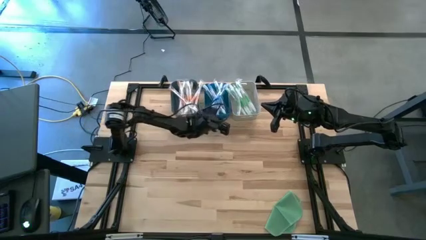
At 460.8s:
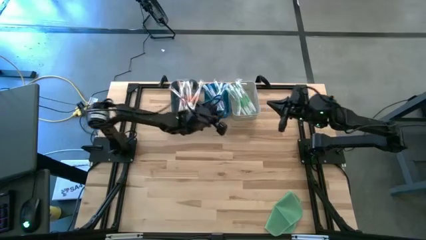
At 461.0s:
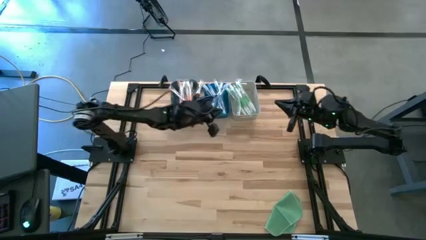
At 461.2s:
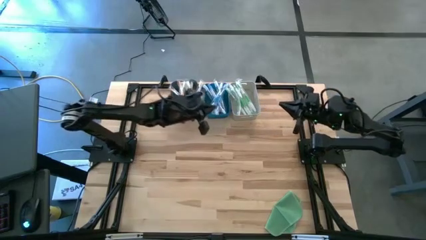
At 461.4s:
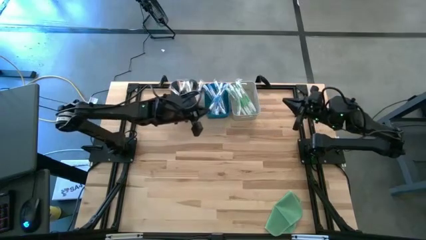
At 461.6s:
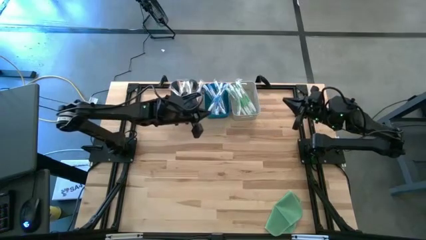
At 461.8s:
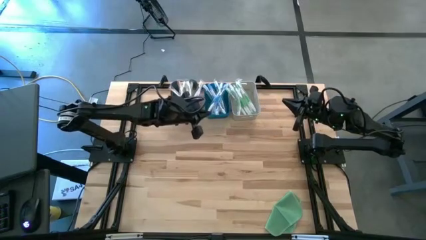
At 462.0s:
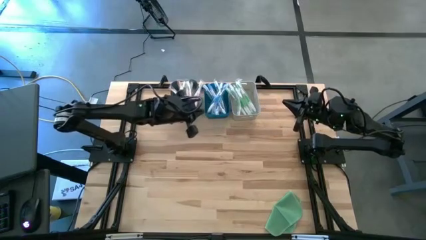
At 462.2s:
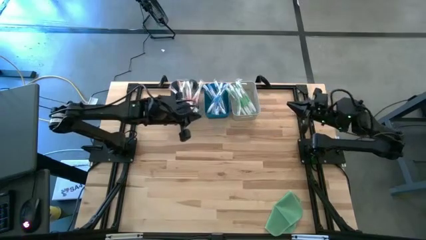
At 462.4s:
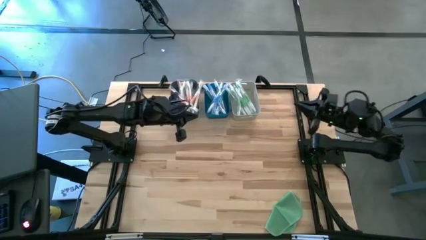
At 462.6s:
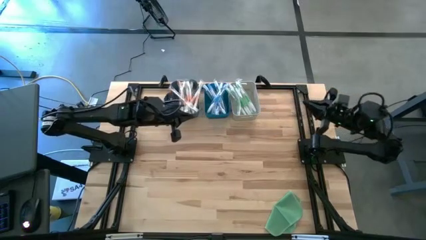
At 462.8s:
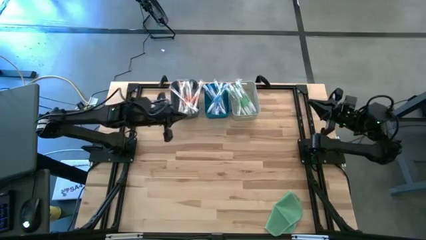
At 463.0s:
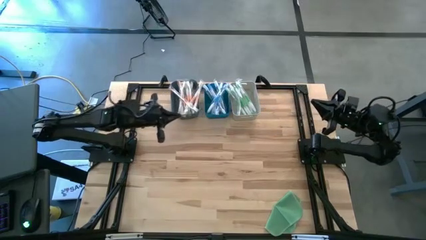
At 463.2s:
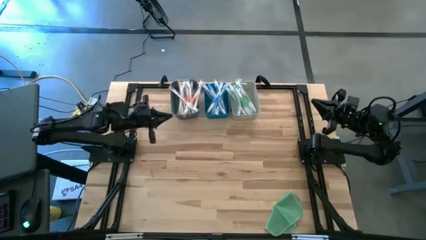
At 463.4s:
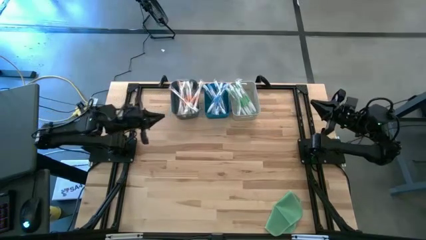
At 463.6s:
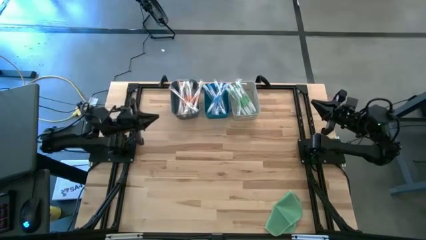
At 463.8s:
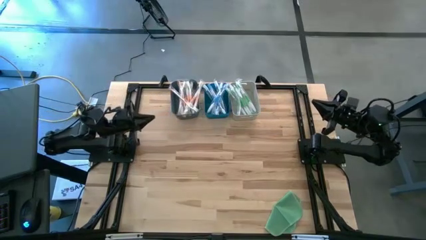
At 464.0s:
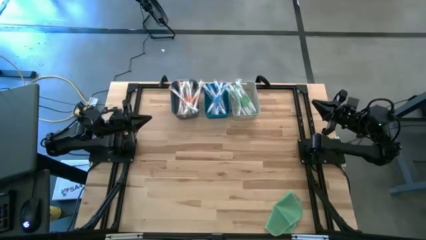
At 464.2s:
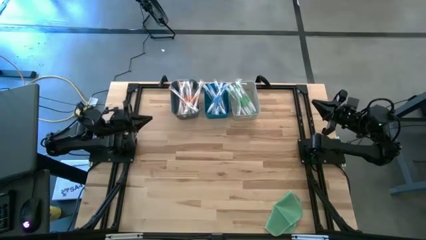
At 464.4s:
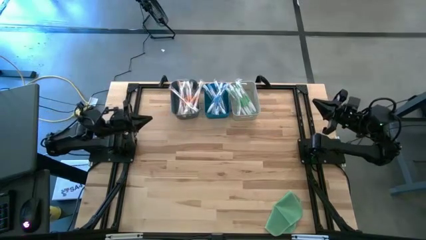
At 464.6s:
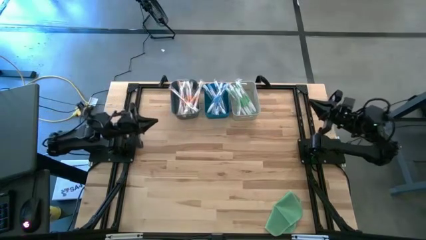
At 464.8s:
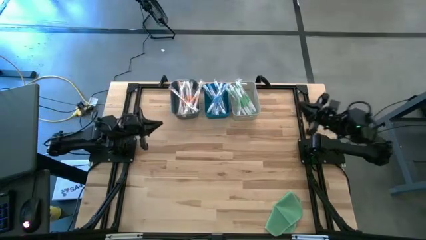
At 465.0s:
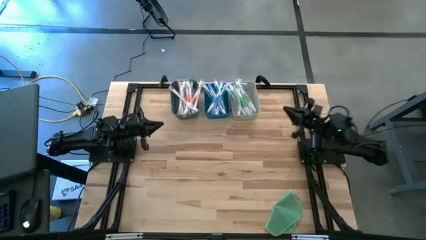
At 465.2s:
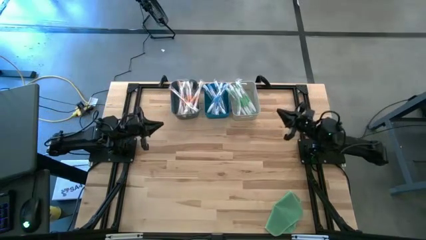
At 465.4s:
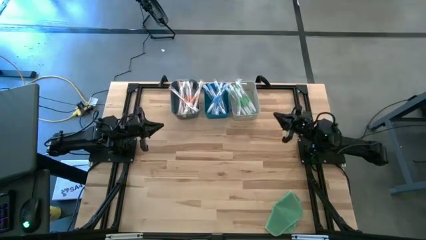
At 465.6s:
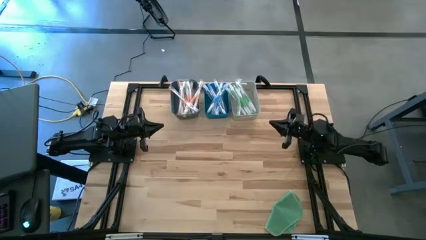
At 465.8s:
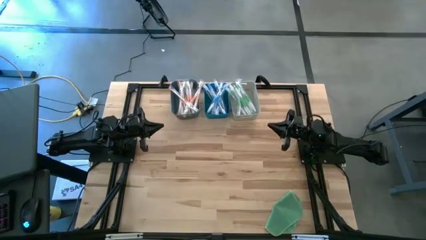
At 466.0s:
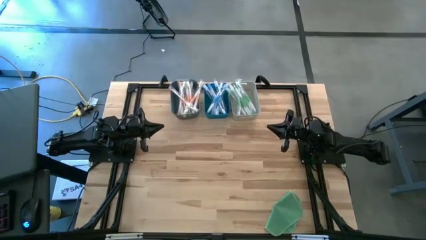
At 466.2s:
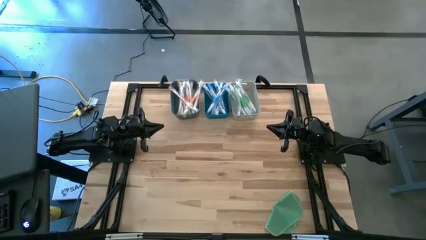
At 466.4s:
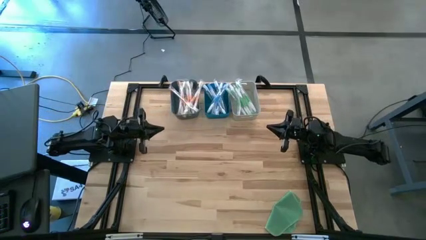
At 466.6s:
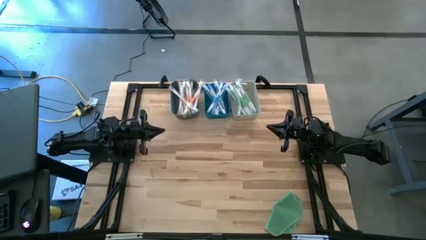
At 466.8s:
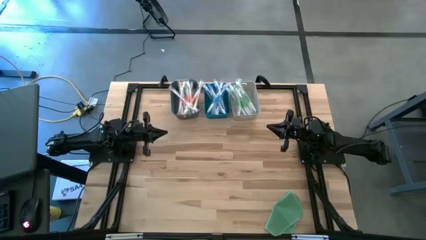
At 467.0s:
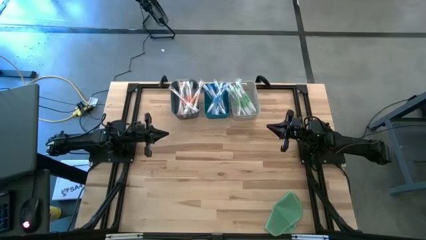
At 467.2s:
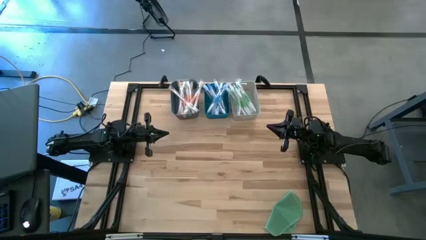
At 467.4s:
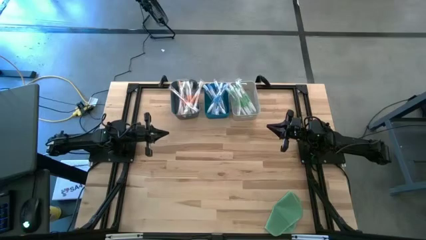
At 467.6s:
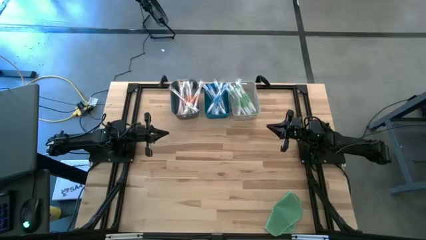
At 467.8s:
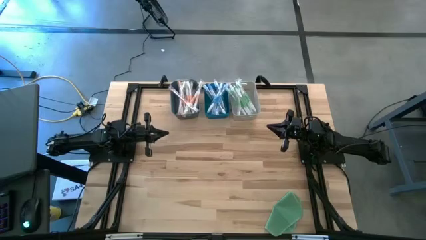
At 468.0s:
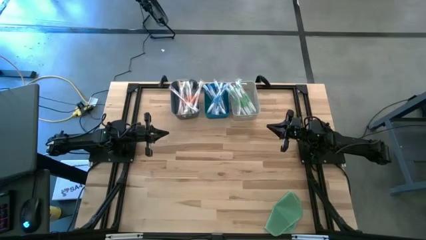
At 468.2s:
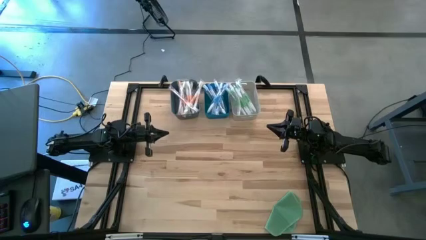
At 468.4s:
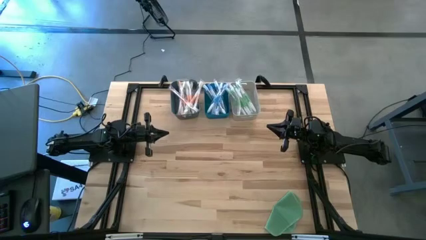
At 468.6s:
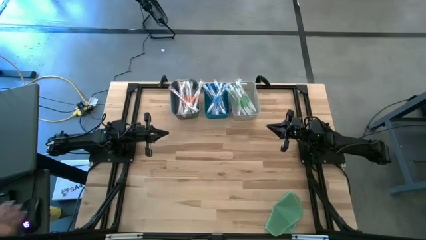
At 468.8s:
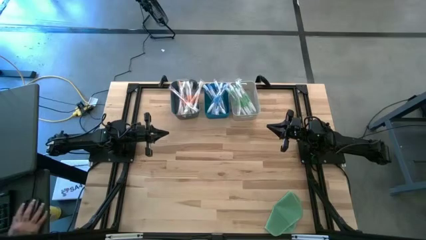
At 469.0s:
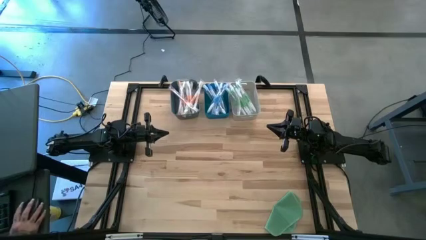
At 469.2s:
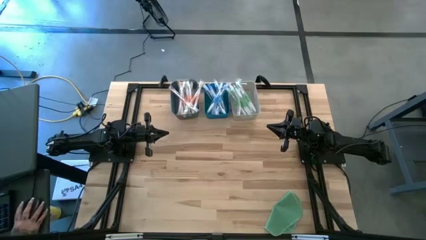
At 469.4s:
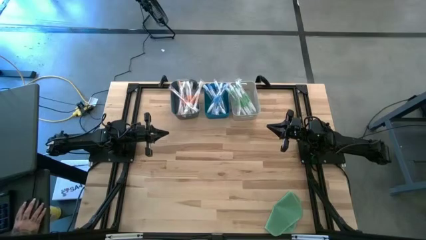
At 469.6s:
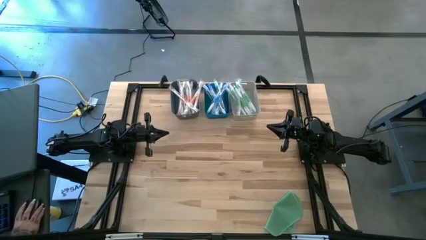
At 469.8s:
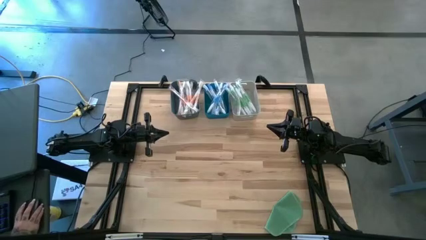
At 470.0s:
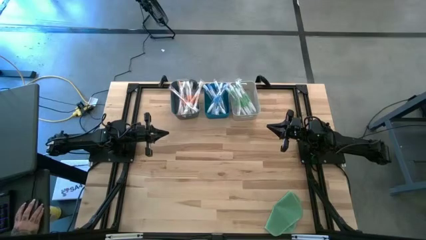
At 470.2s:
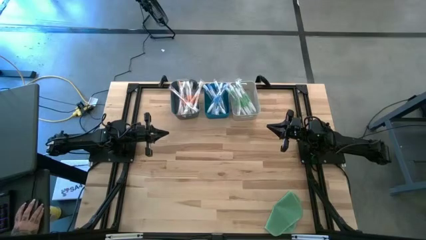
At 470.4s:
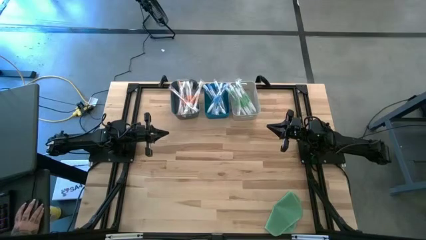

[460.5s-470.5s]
Task: Pick & Place Toothbrushes
Return to Home Position

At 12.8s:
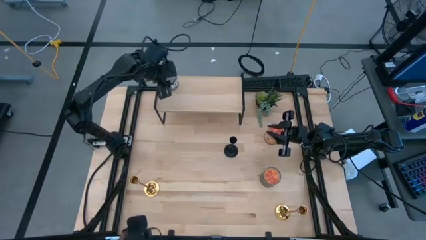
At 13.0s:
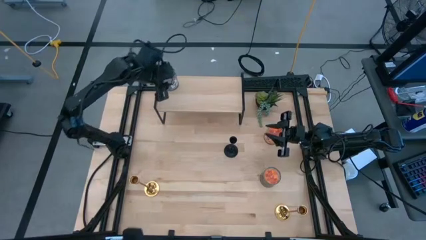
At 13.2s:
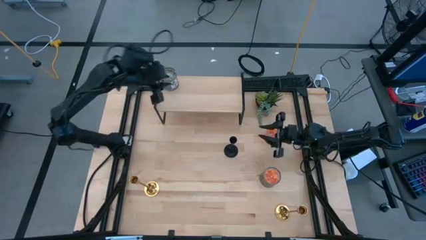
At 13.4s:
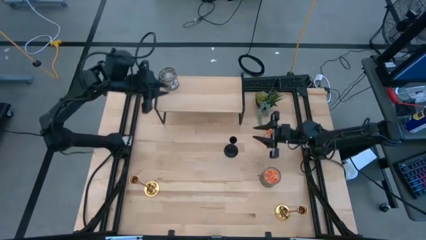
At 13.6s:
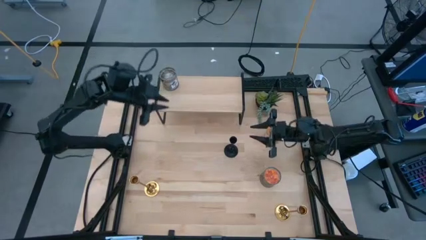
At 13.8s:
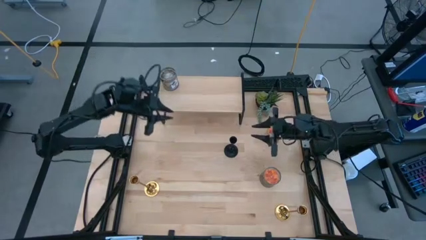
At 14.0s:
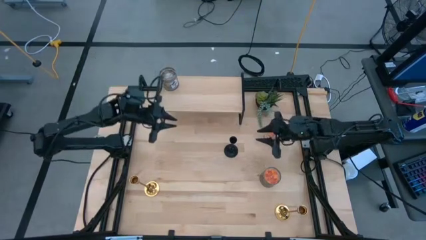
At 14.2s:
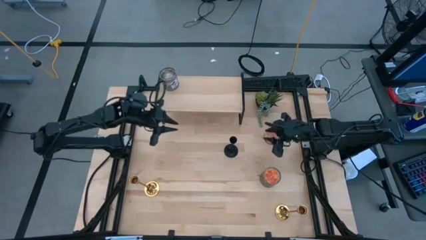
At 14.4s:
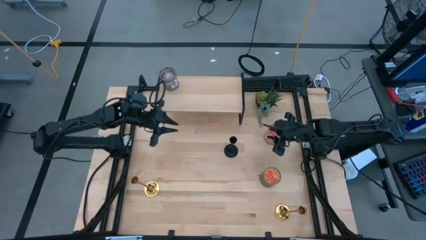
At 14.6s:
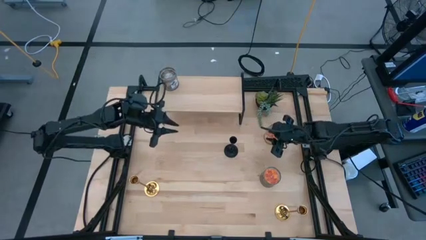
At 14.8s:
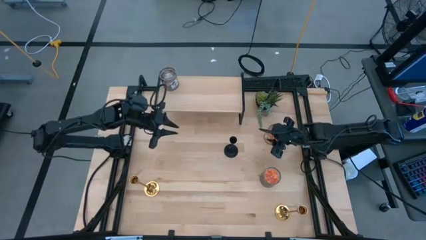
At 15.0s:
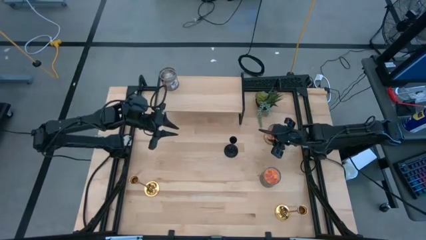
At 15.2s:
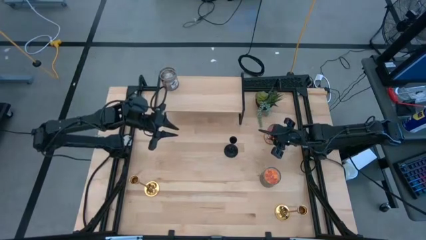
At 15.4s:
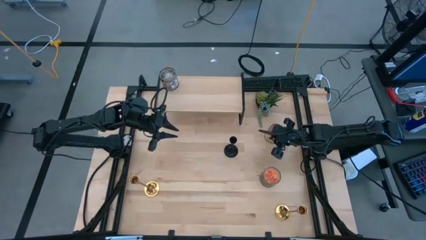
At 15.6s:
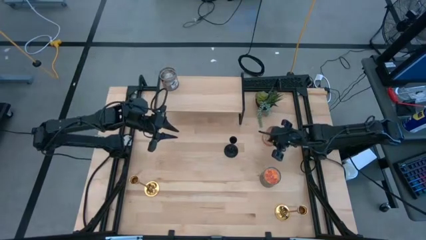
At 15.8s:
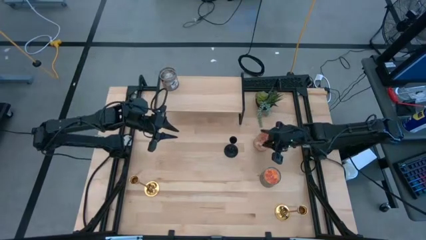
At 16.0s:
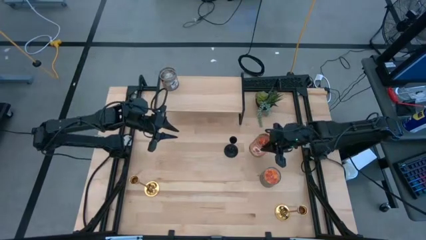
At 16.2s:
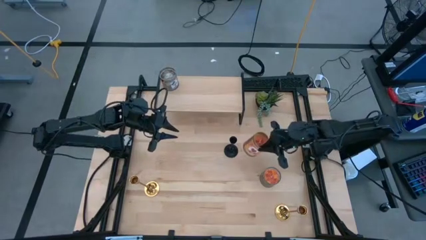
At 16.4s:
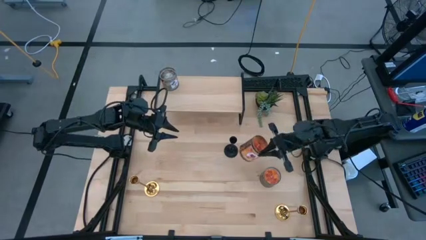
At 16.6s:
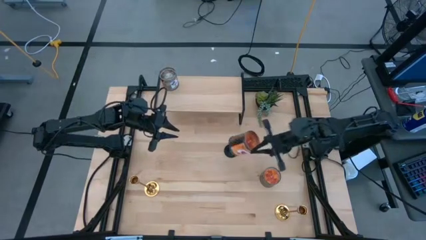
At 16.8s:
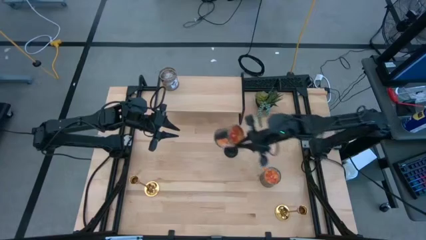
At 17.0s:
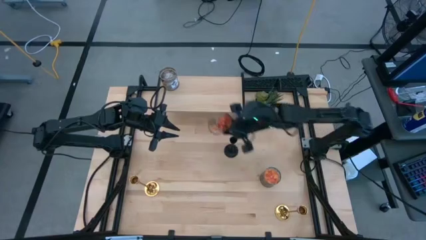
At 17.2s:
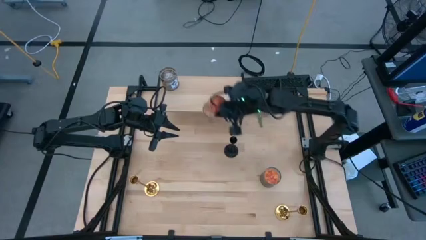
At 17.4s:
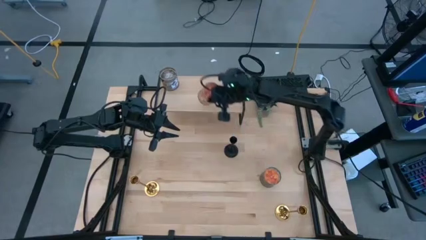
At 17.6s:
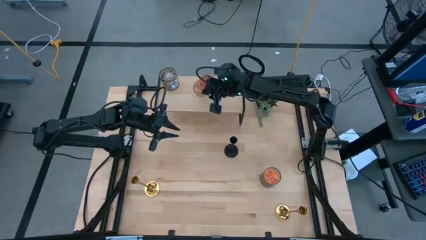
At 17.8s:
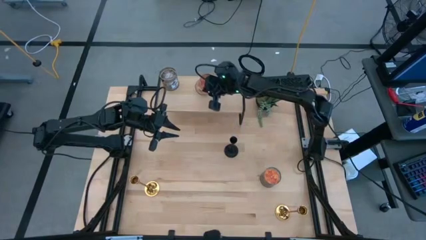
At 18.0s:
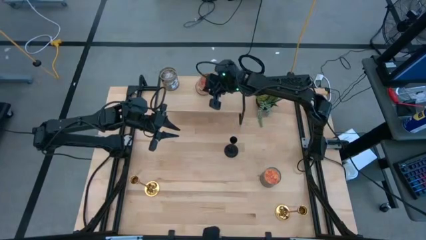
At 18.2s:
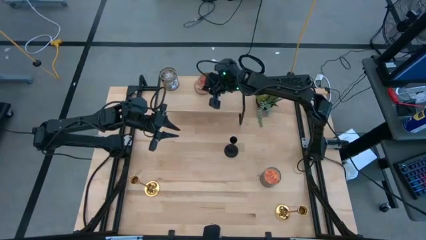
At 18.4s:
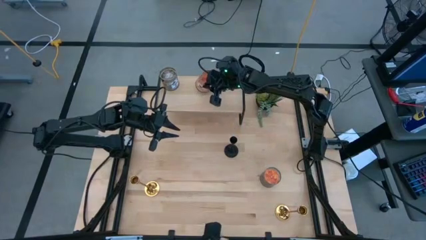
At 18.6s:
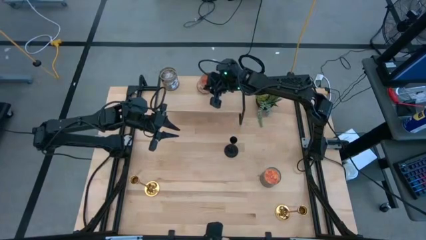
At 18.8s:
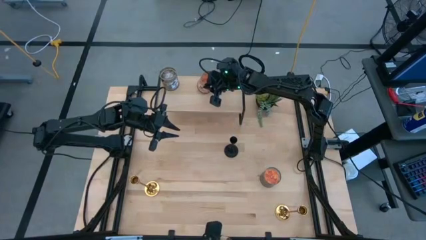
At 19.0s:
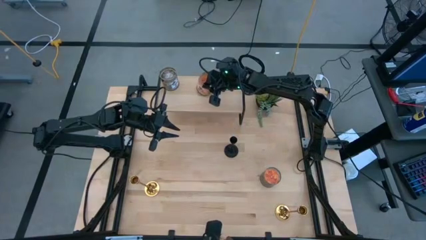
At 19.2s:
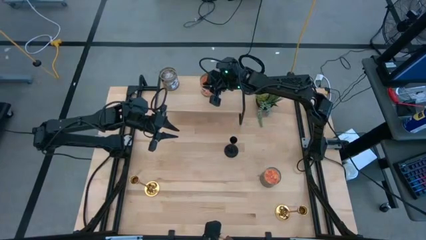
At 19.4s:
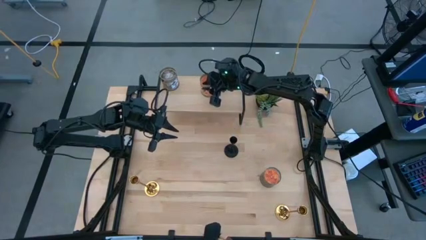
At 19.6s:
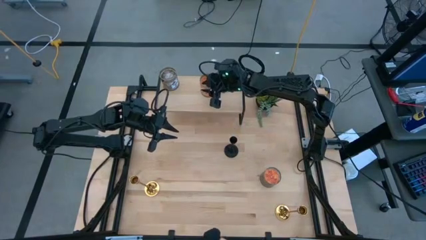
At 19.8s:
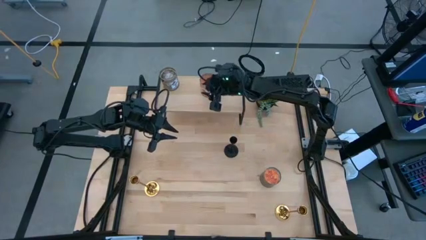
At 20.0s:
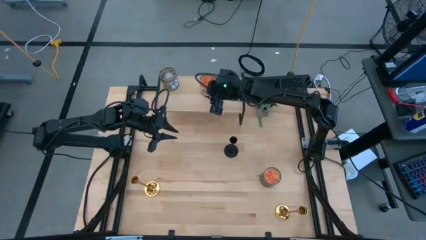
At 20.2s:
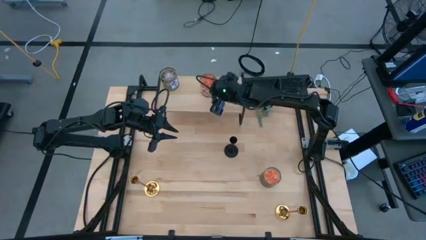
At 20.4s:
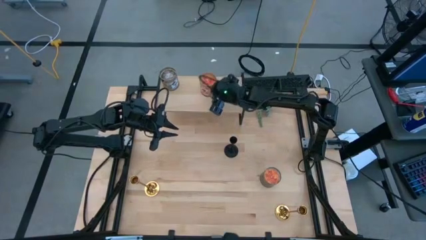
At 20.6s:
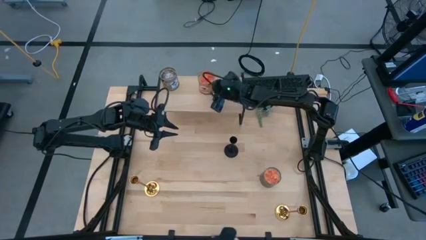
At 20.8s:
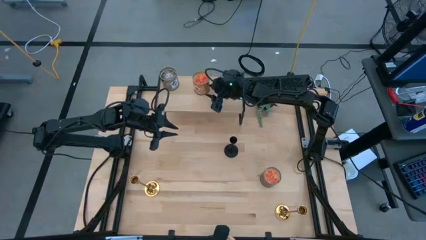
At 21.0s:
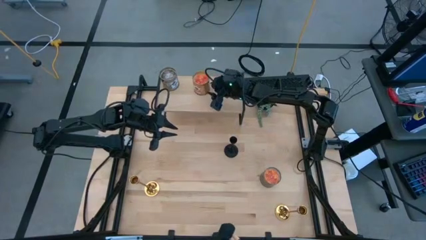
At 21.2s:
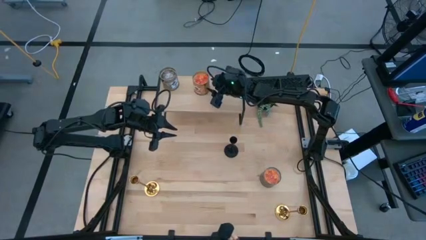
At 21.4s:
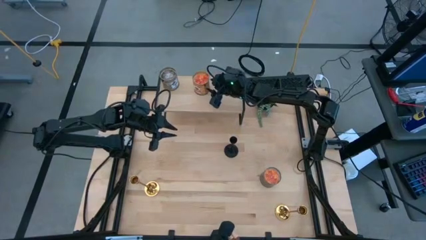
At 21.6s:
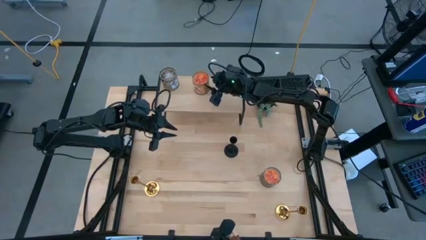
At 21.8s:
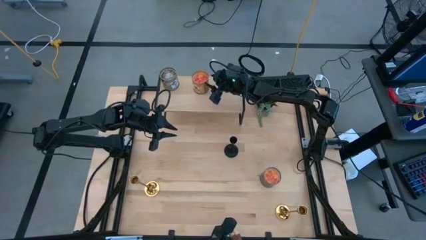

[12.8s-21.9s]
Task: Pick & Place candle stick holders
Put the top orange scented candle on the shelf
